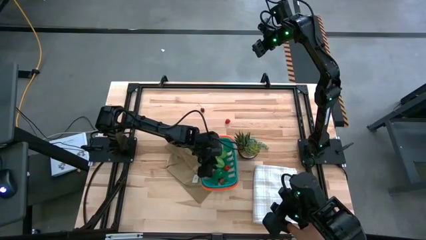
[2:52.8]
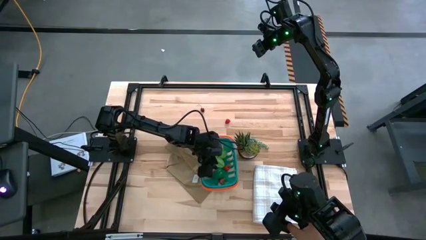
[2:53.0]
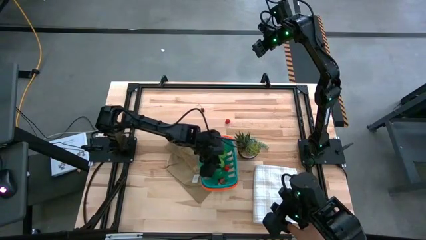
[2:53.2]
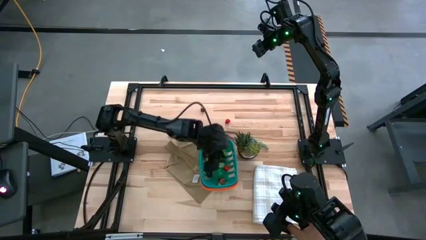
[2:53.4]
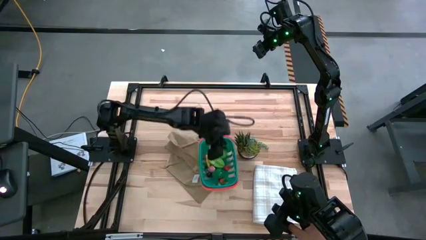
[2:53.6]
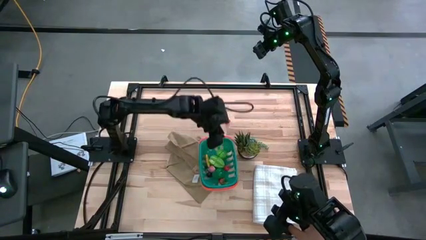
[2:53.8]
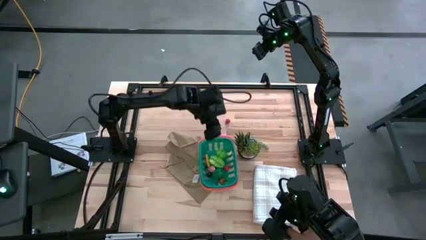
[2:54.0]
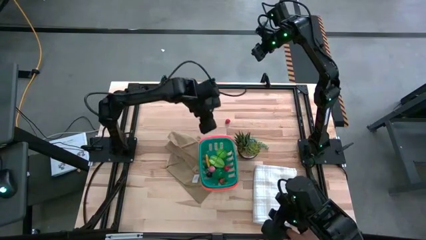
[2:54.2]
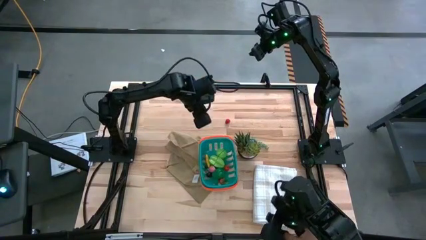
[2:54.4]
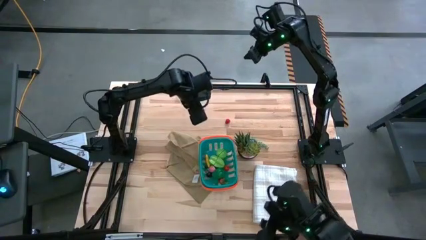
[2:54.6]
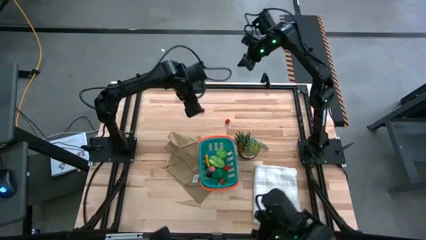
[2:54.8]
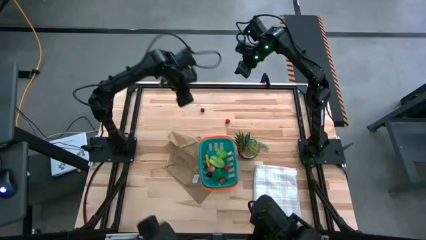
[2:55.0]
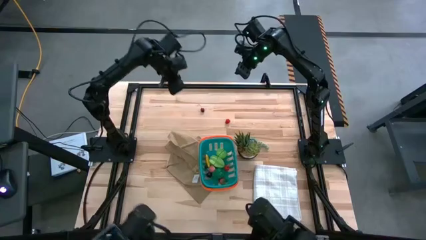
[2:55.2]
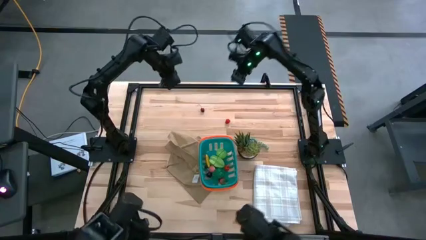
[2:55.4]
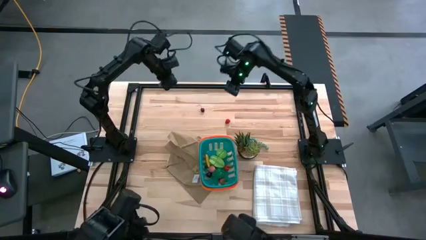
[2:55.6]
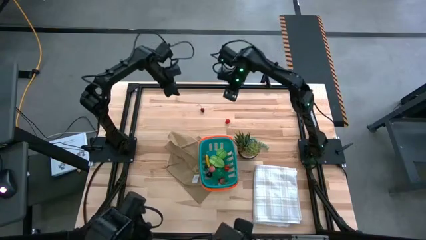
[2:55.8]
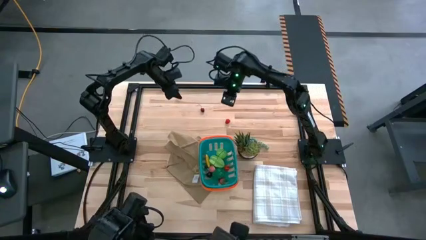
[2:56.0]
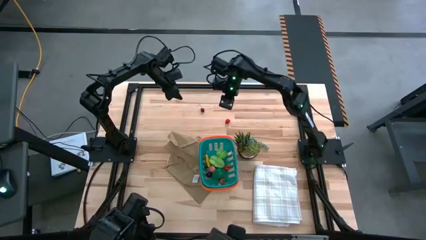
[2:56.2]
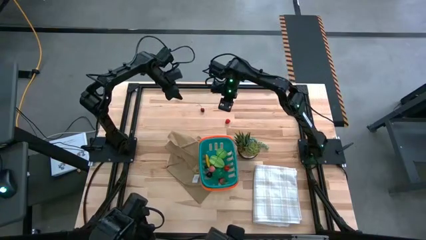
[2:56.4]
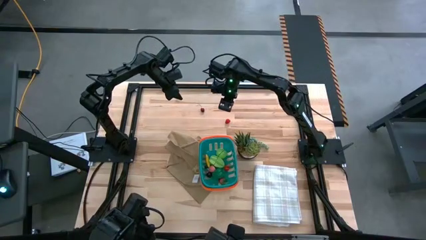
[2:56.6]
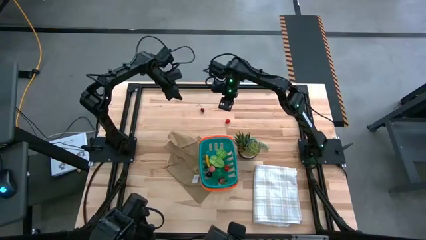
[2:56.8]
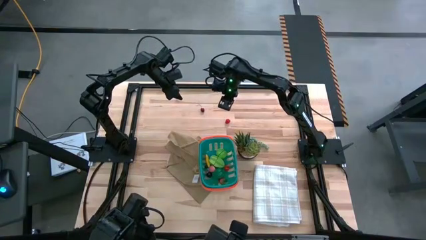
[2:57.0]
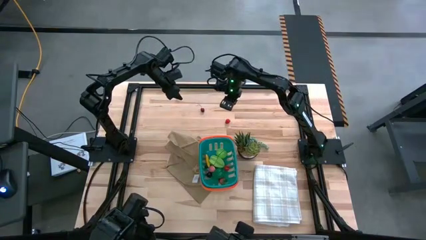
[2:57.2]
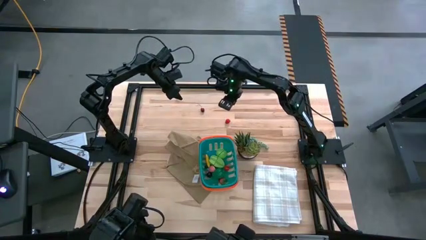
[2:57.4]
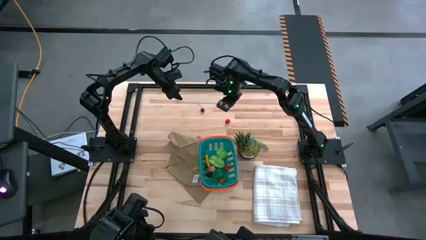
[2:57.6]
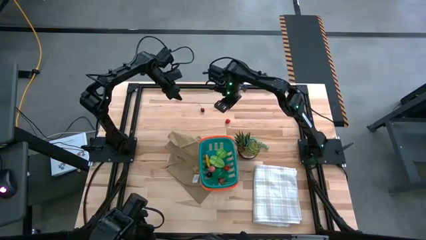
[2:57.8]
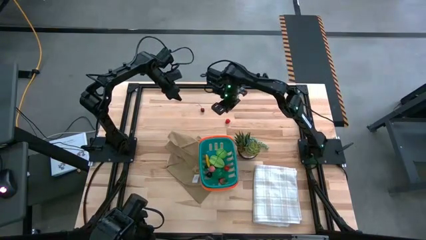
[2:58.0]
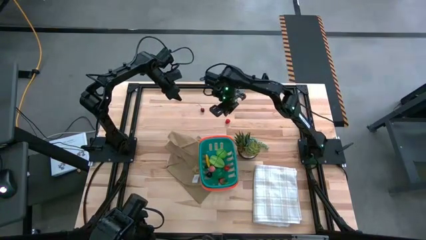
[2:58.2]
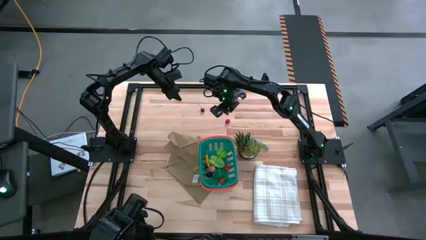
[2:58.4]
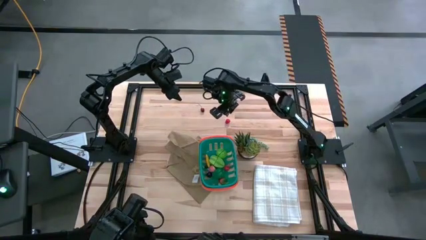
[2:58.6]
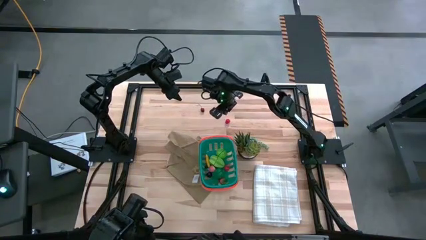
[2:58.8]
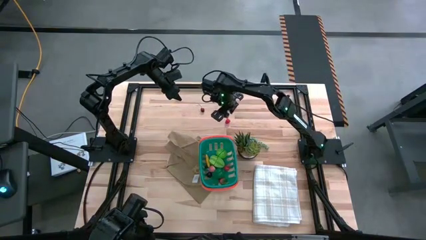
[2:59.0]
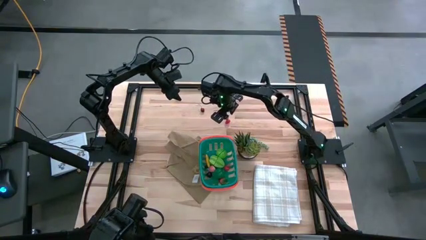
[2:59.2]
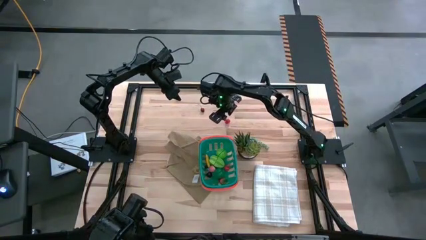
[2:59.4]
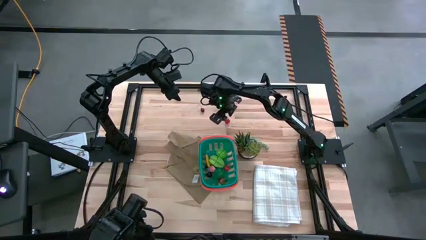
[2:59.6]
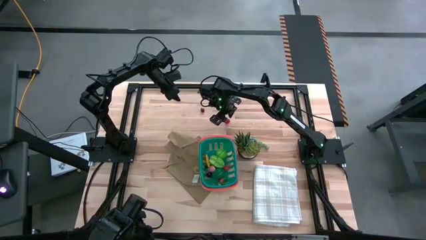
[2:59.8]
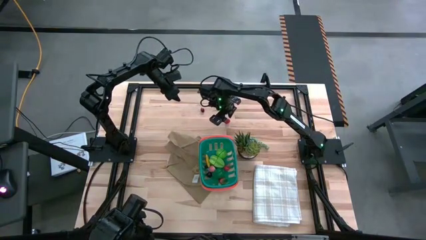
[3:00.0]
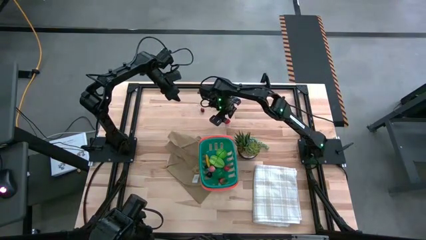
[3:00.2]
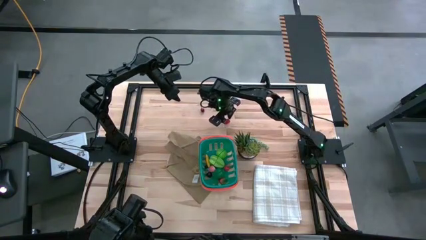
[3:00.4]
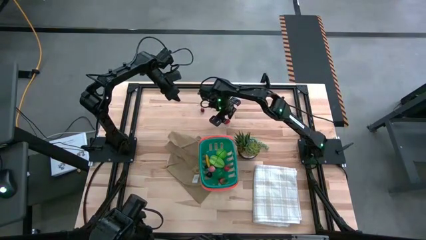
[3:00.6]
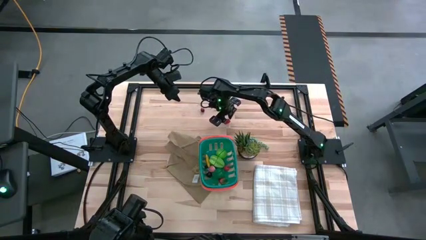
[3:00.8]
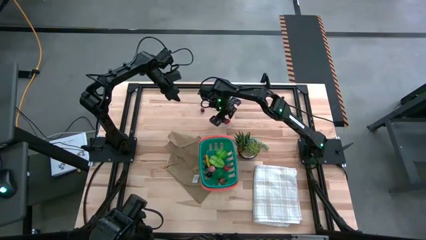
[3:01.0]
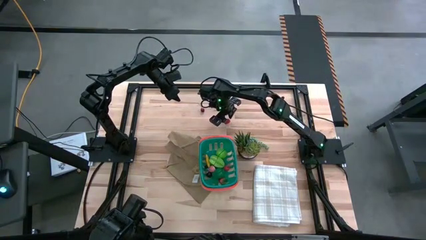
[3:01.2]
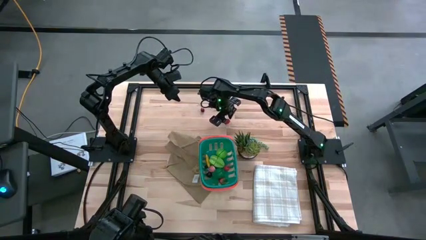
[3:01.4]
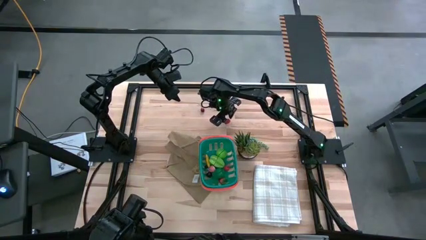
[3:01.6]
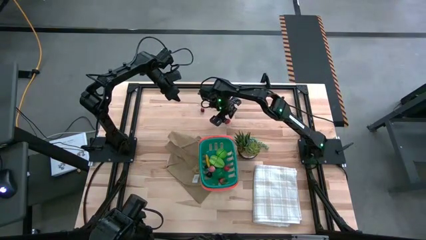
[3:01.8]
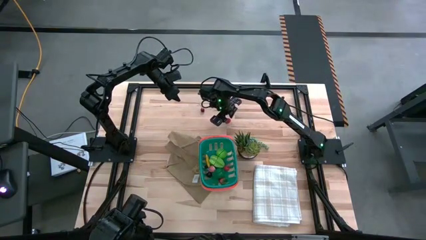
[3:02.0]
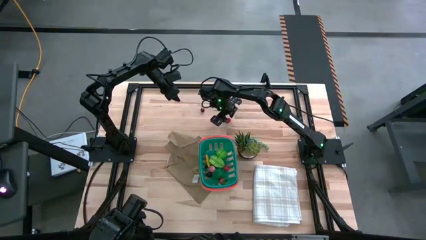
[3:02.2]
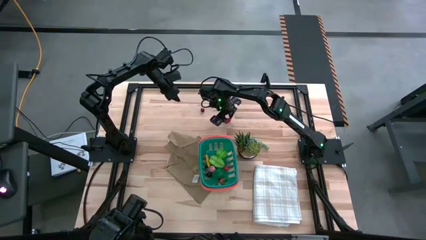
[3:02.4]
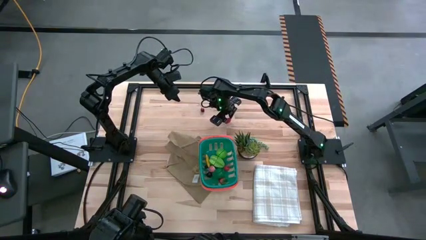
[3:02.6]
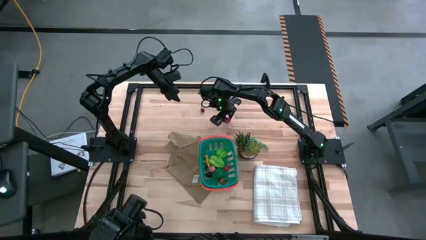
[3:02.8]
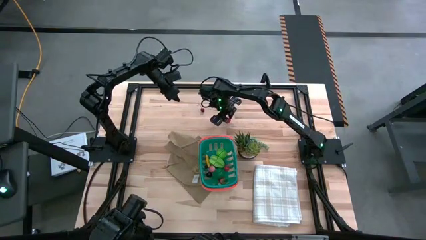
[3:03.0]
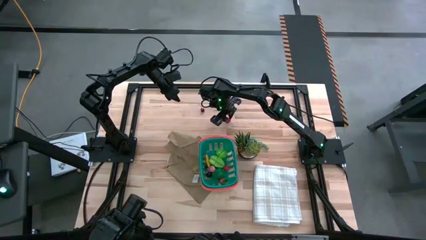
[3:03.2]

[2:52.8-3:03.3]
Task: Pick and placing Produce into tupperware
Put the red raspberry into the green basket
